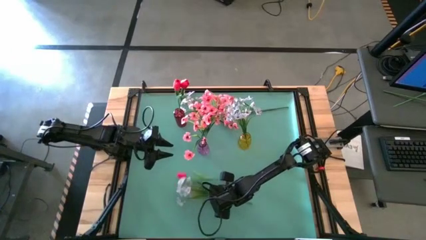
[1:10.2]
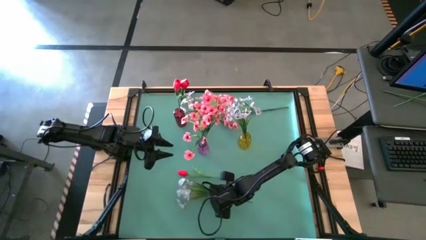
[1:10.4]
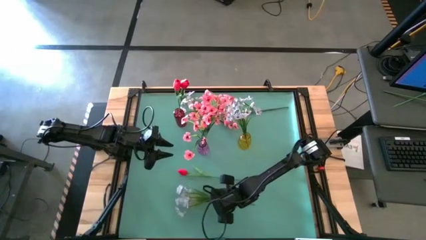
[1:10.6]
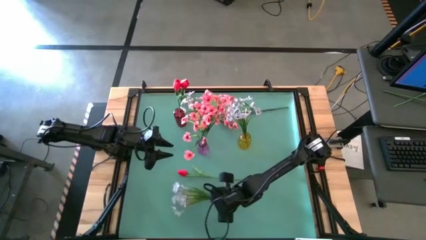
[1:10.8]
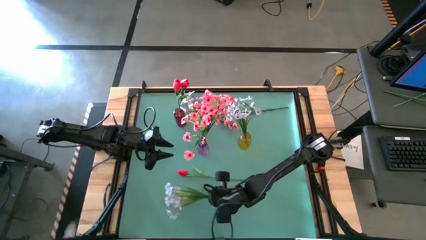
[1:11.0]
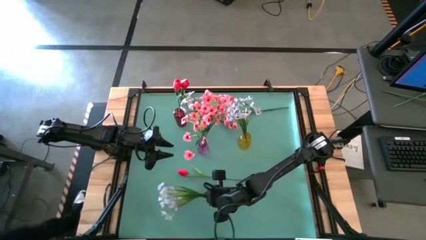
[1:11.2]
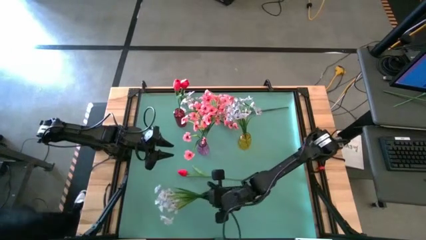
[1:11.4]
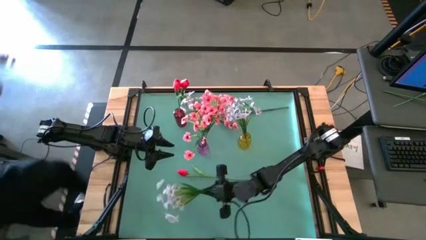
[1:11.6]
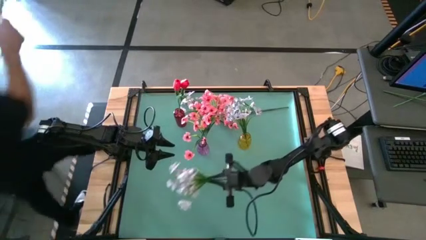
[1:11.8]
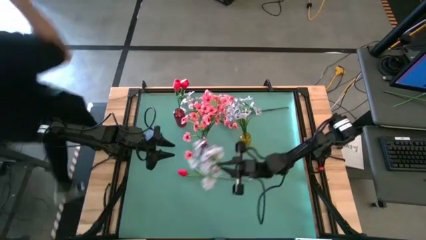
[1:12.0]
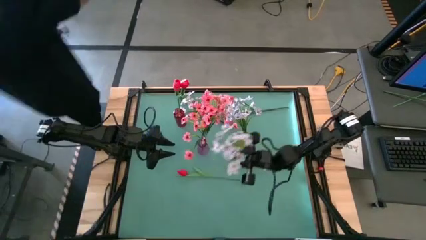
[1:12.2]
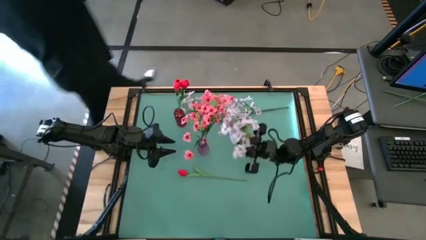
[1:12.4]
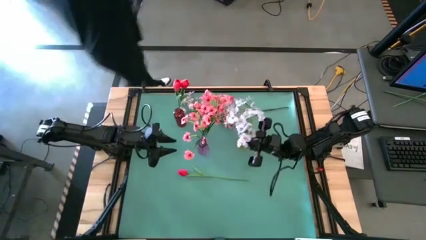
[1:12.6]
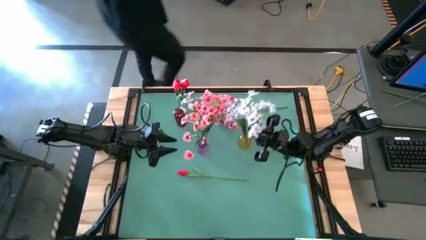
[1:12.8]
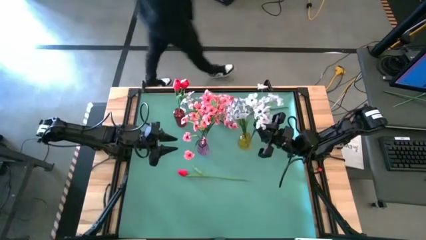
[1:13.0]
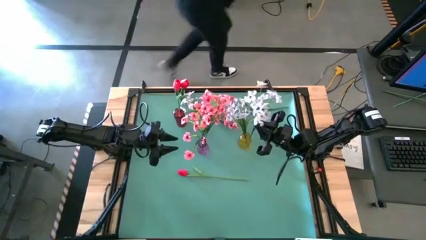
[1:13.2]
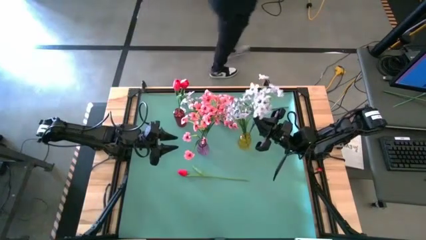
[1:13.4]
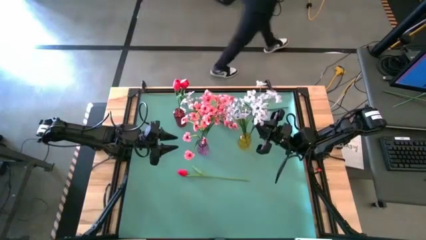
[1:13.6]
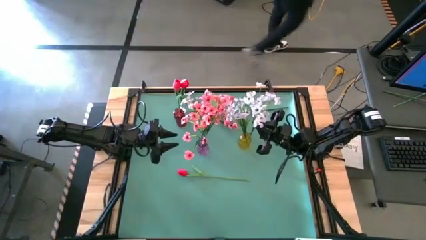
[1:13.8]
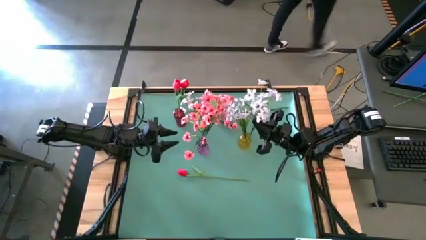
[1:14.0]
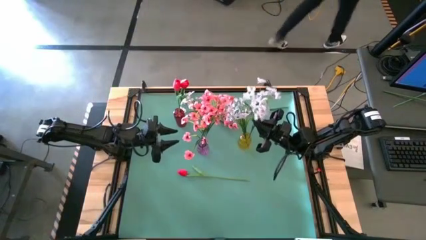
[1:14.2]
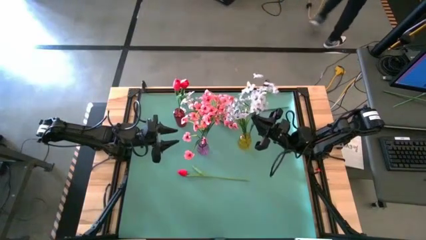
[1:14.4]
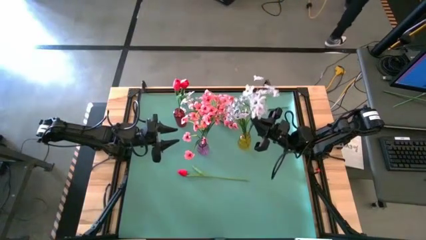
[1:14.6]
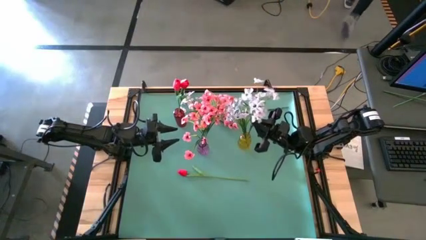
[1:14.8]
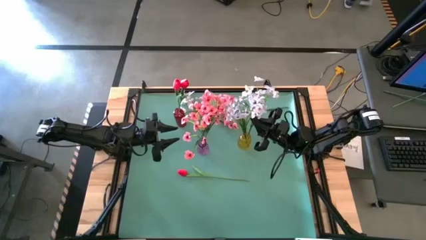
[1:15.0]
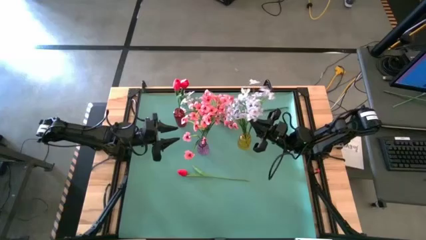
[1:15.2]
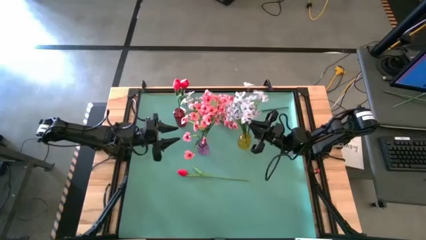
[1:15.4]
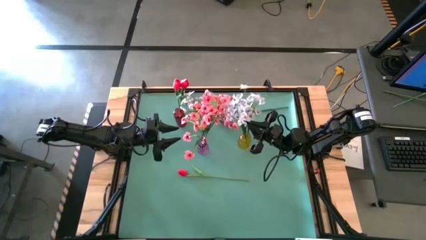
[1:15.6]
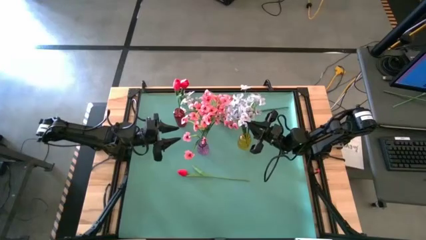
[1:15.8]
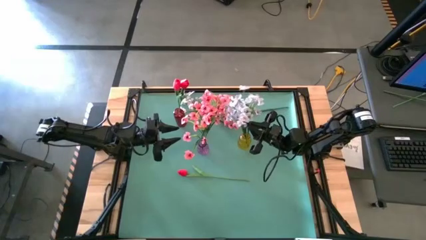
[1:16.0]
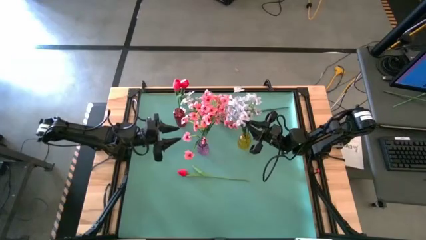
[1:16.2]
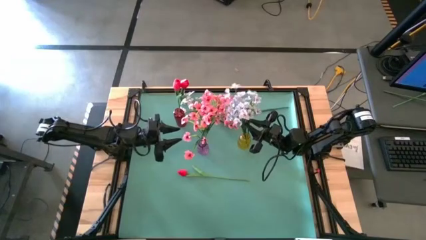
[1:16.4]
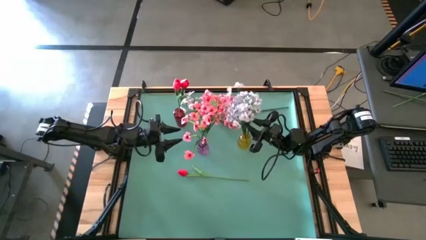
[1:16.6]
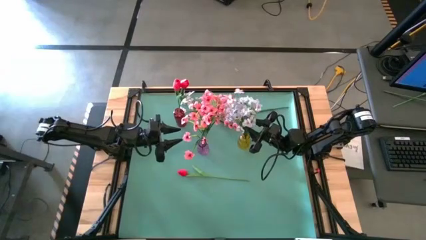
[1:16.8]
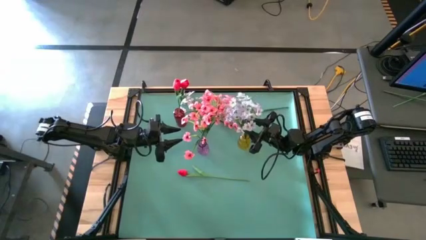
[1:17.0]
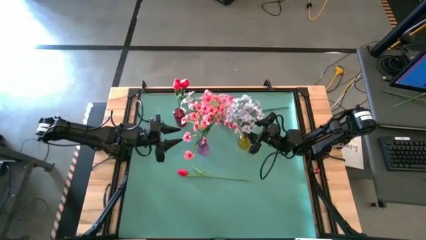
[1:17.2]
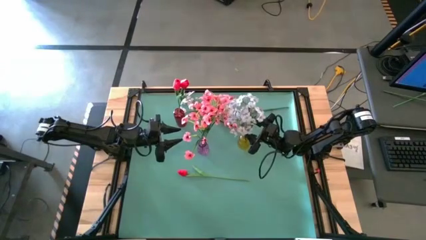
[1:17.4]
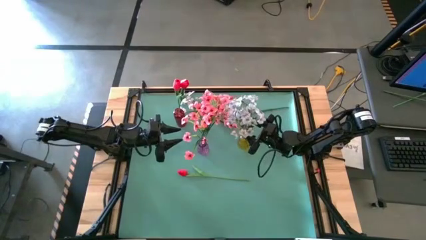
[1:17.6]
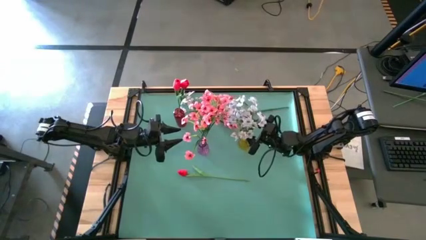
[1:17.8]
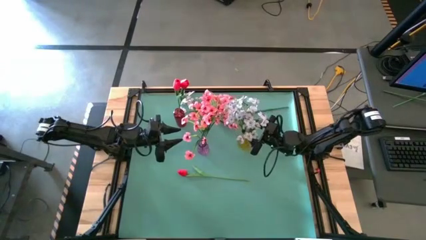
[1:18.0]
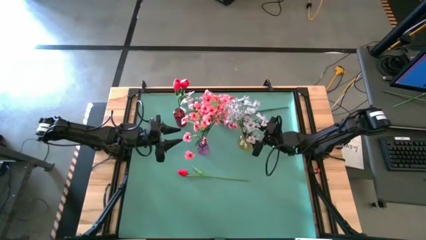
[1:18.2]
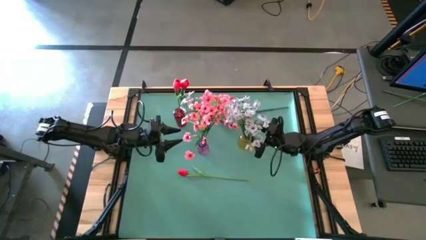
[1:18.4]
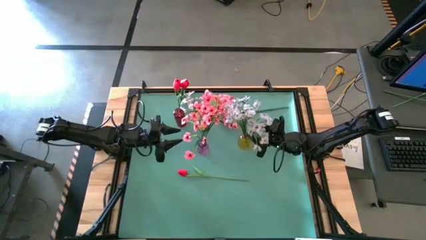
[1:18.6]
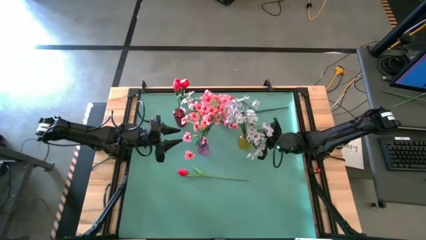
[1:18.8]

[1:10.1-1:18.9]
Task: Sort flowers into vase by color
Put the bottom white flower into the yellow vase
